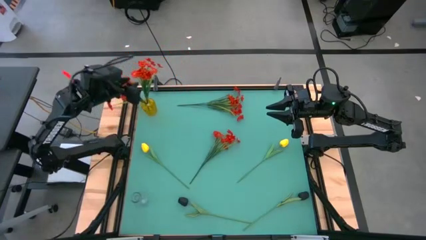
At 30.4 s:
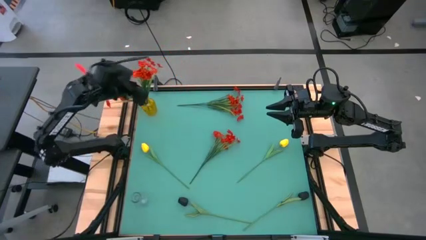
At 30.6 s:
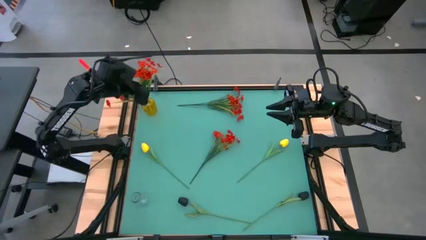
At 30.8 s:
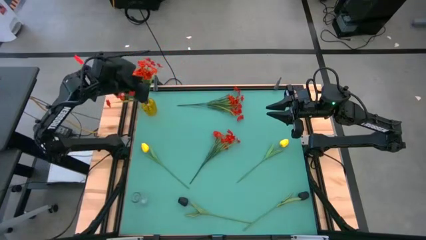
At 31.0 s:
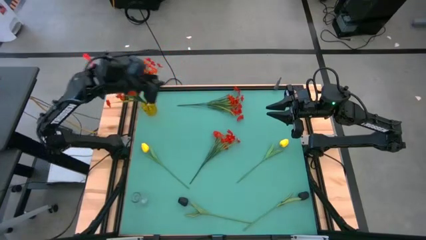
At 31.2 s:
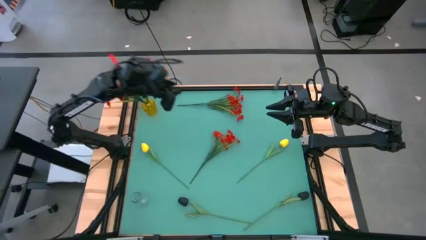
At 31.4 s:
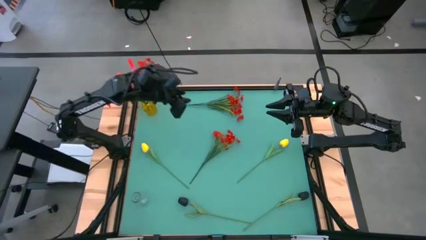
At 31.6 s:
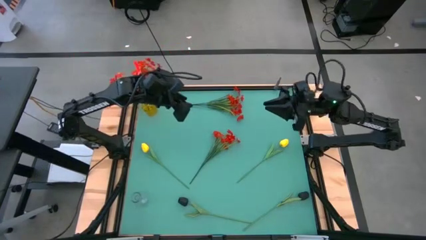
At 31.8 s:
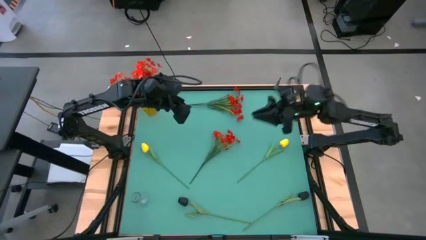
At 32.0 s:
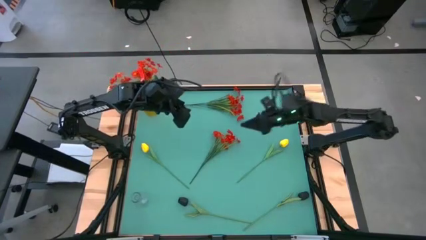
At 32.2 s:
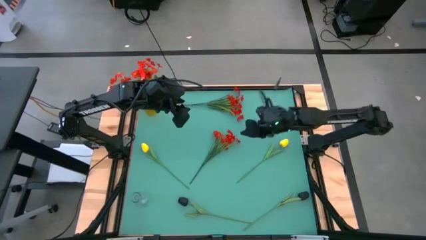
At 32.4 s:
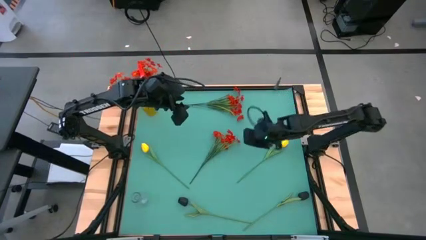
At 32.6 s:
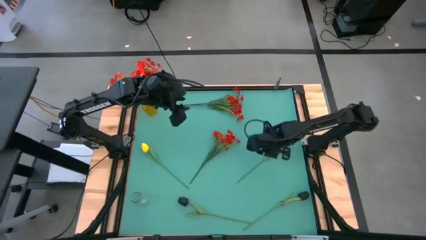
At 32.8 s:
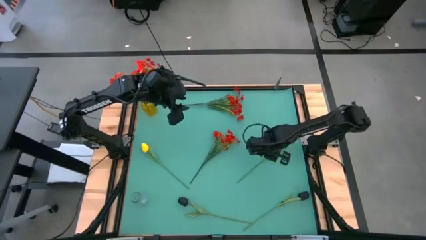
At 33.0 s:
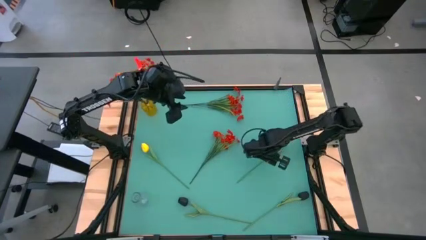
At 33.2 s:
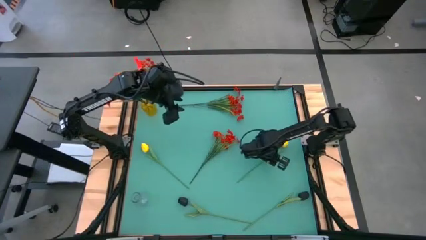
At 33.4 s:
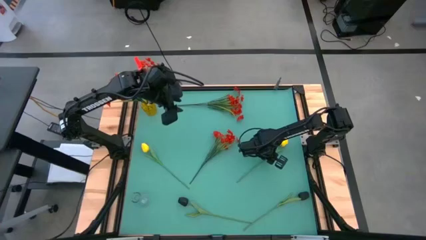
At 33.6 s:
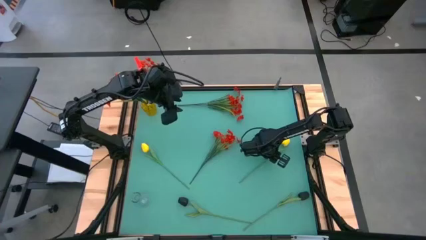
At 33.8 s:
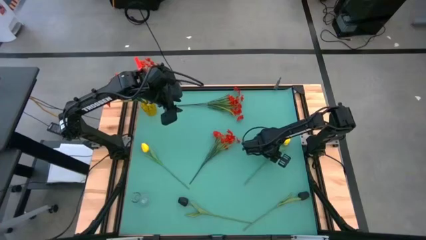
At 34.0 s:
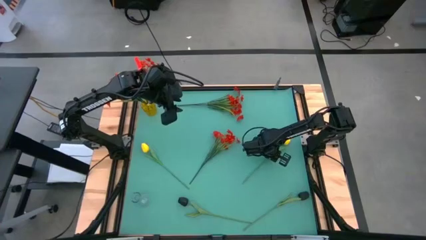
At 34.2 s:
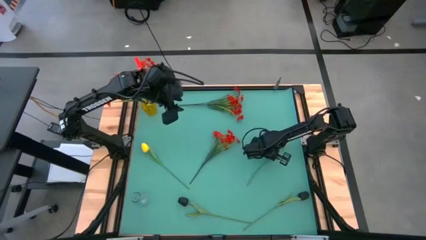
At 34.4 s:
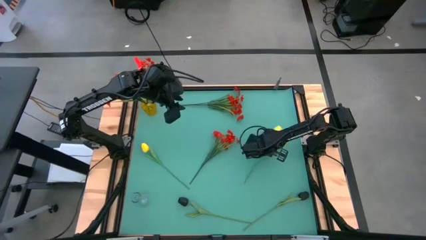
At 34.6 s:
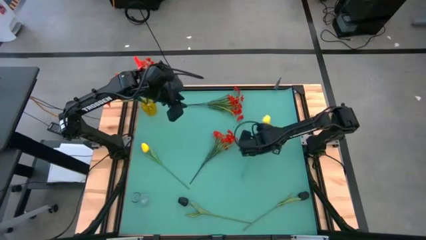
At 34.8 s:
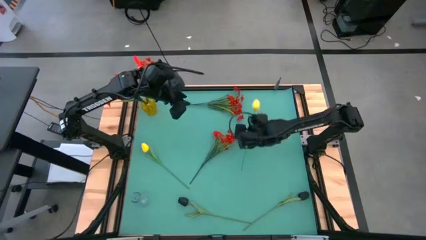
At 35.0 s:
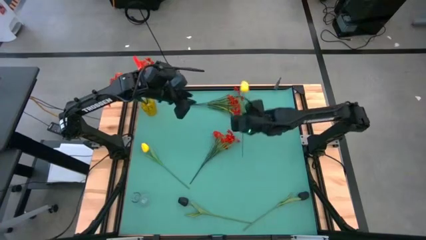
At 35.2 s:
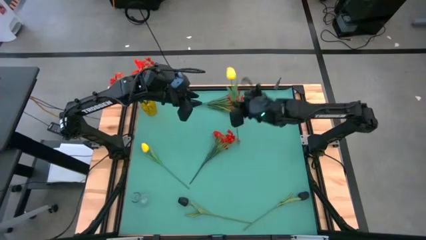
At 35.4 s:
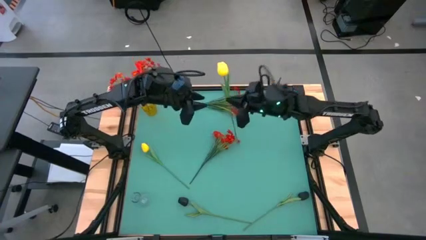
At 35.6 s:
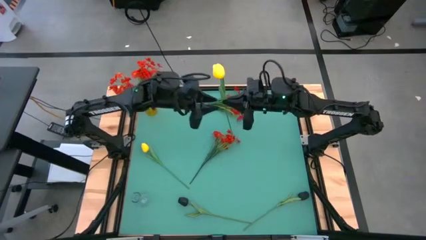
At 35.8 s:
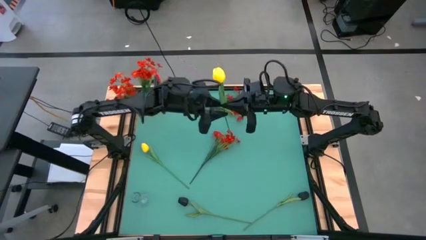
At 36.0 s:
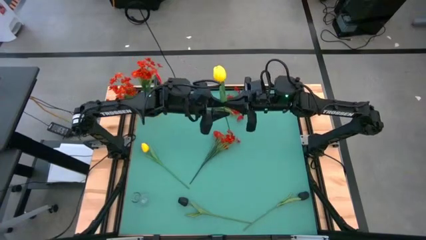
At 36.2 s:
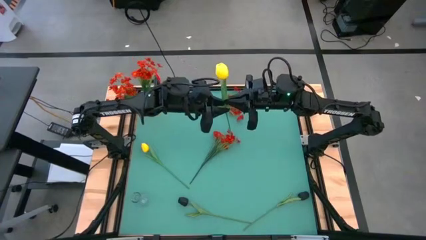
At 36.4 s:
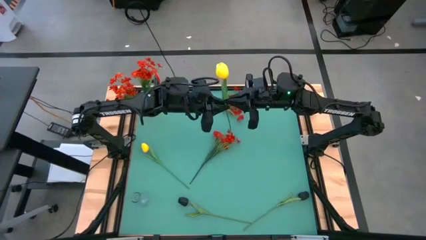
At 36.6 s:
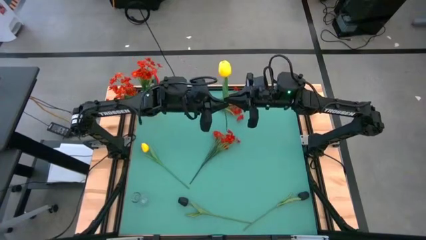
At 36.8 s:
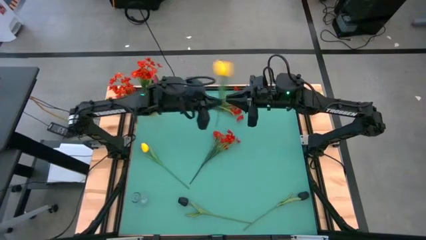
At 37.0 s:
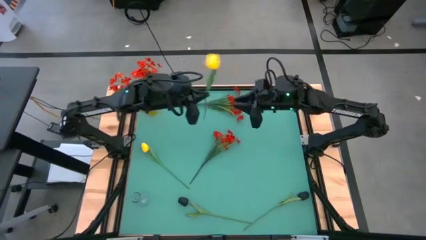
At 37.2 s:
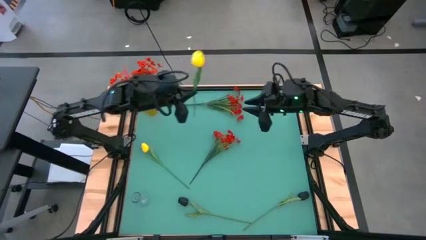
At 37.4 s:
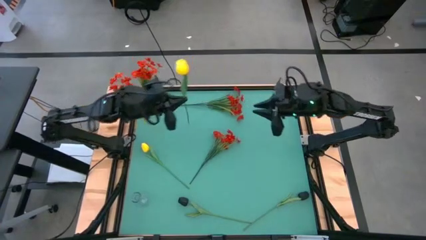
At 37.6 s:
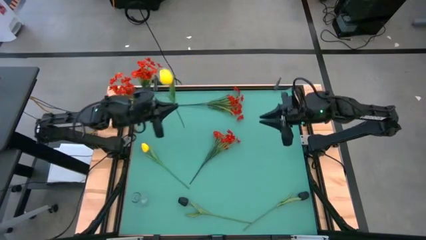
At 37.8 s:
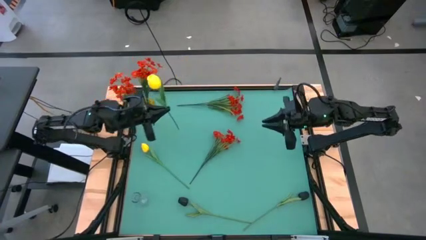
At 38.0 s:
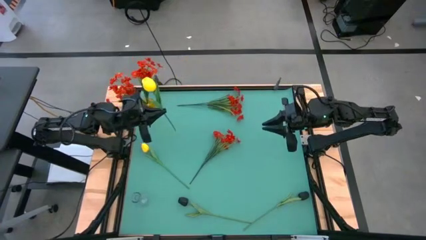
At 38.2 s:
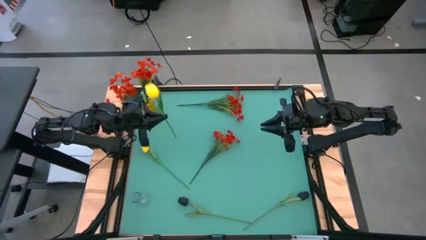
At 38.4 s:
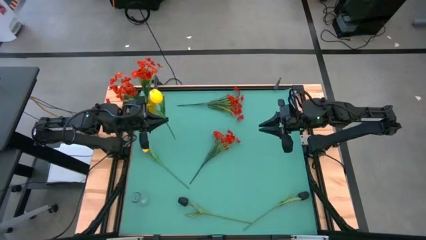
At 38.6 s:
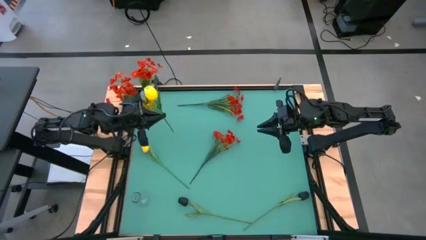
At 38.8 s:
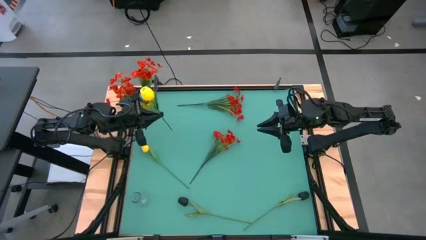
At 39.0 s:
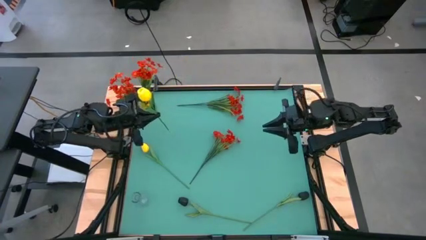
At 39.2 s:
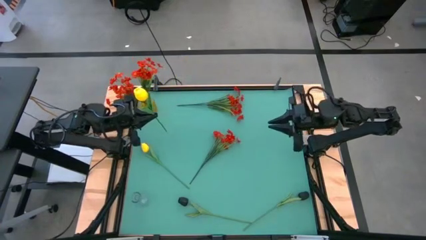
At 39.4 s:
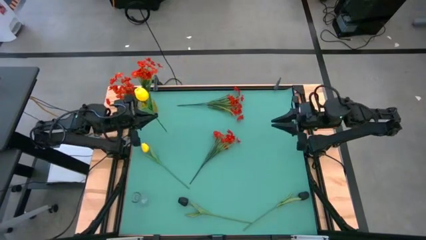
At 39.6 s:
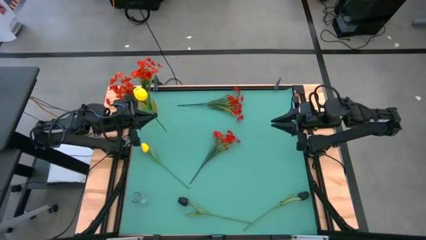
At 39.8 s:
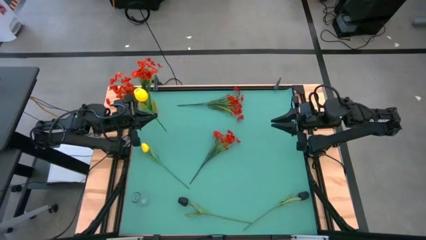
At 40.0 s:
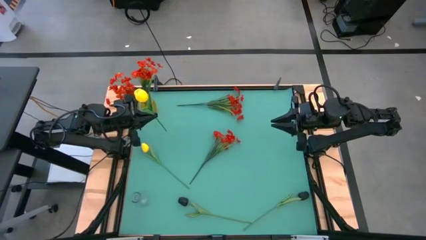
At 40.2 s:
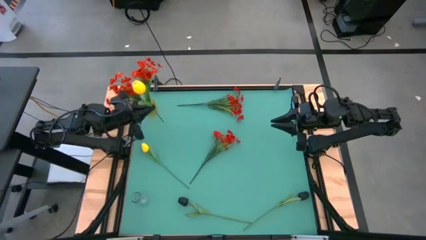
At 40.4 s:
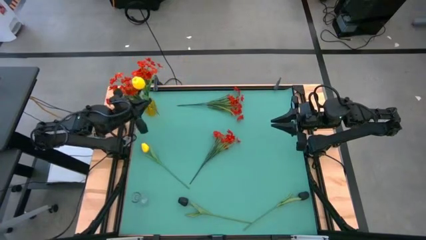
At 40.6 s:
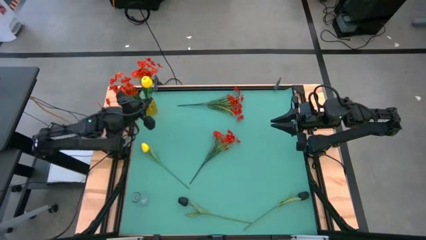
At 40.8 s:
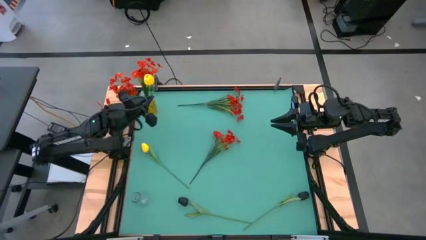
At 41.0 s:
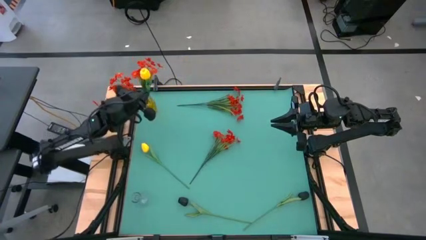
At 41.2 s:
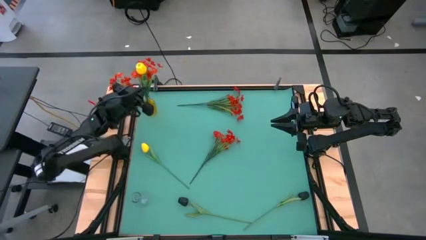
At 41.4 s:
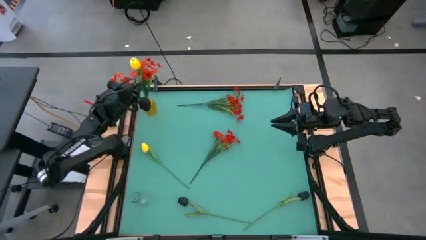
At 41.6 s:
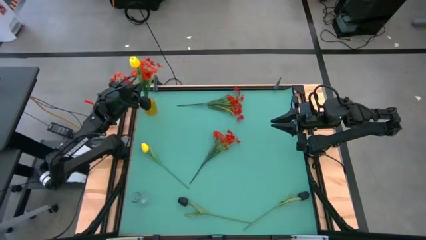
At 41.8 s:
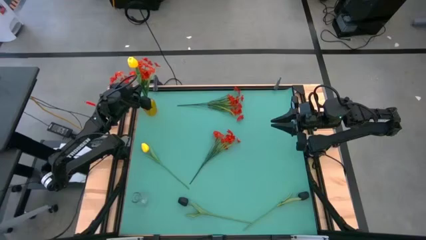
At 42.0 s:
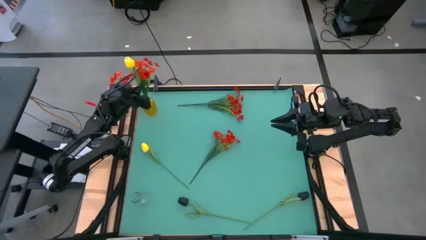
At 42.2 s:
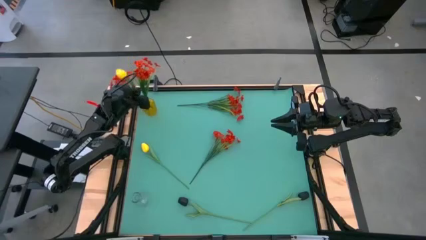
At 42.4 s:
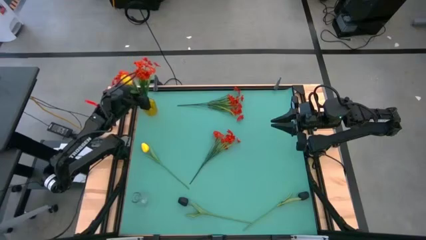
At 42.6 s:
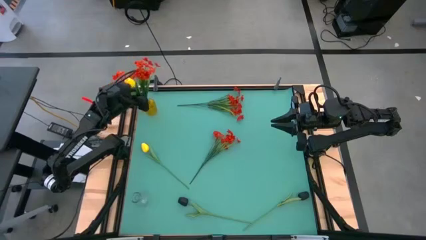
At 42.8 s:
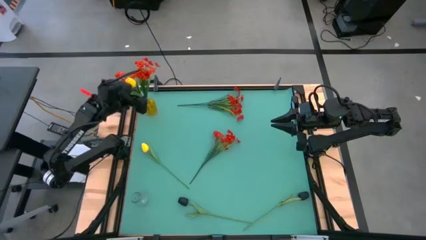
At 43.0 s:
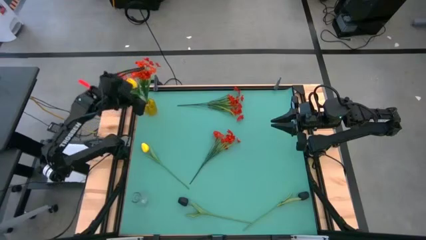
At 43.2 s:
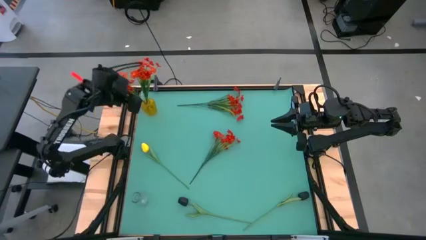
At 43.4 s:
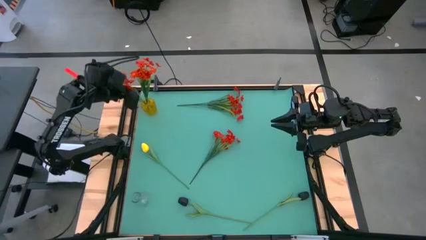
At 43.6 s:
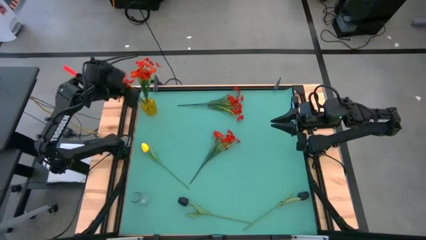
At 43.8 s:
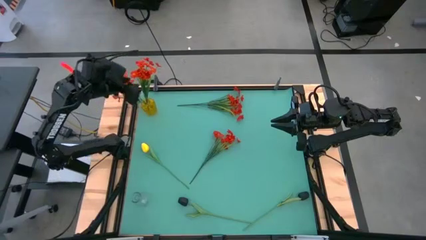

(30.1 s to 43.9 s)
Task: Sort flowers into vase by color
Put the yellow flower into the yellow vase
